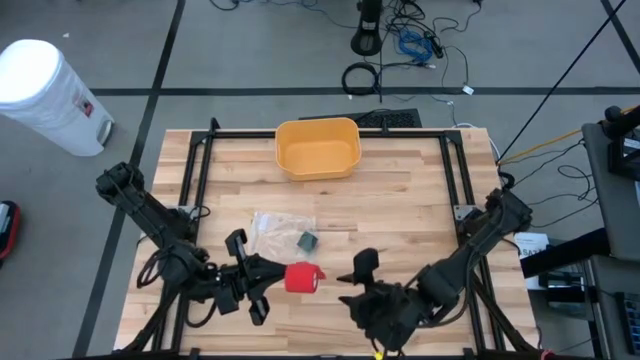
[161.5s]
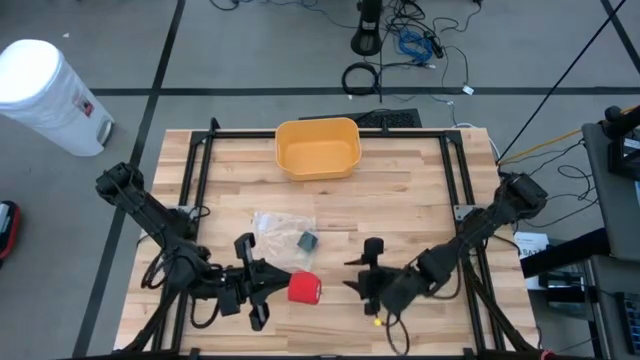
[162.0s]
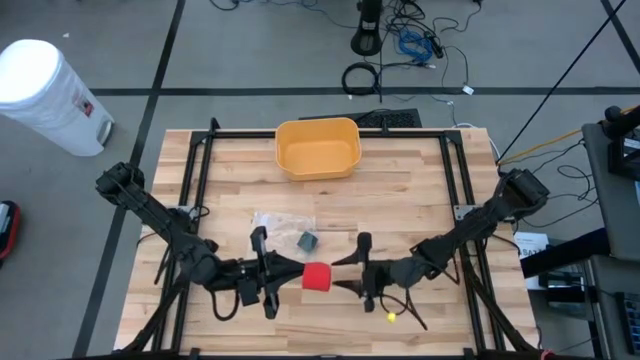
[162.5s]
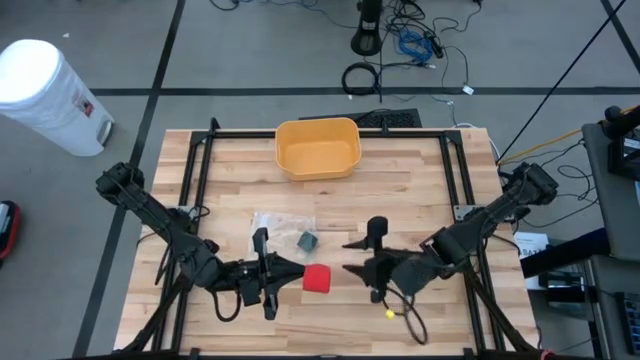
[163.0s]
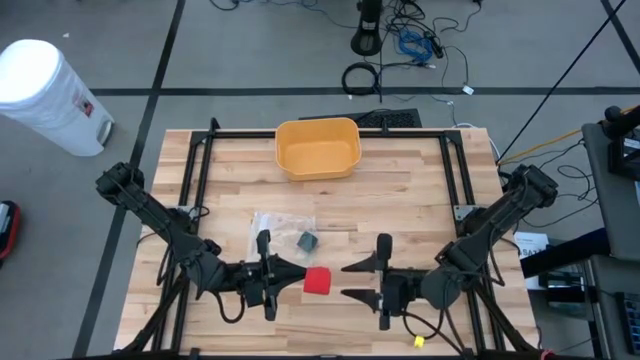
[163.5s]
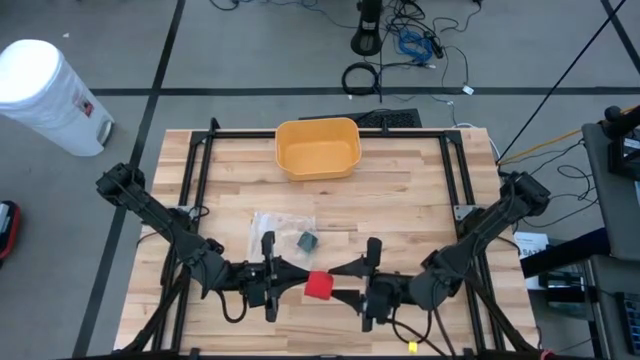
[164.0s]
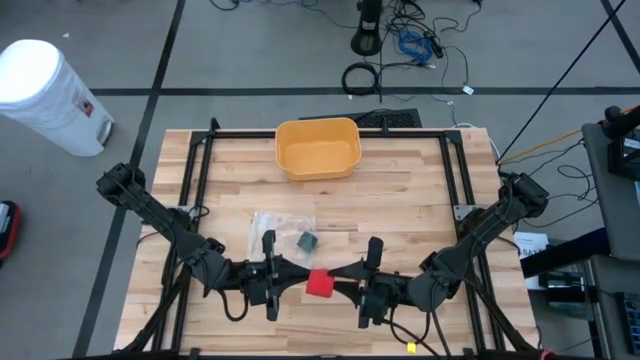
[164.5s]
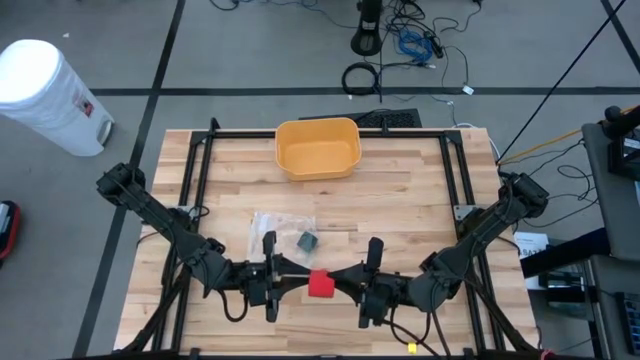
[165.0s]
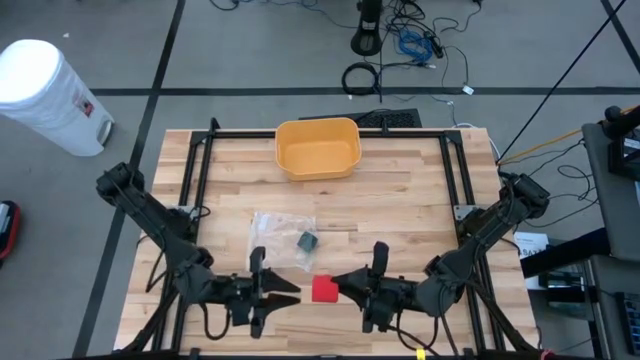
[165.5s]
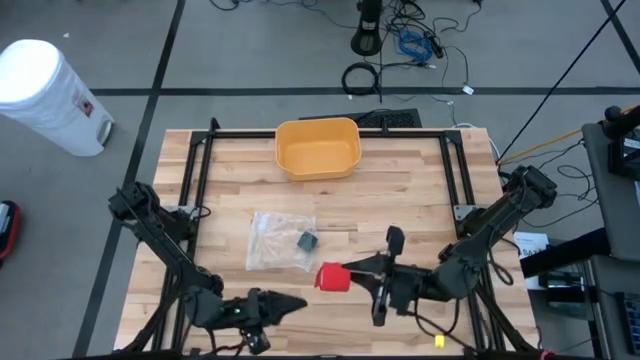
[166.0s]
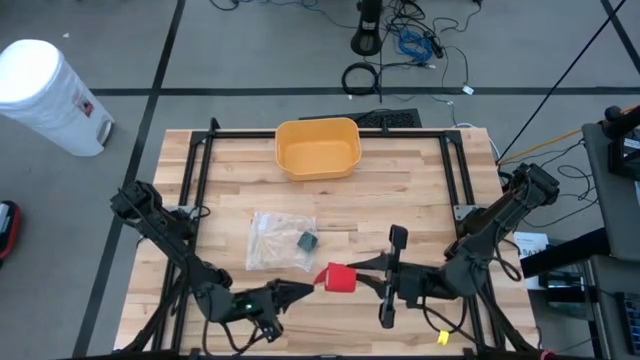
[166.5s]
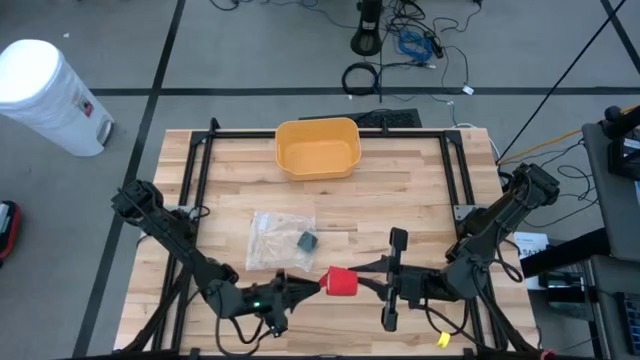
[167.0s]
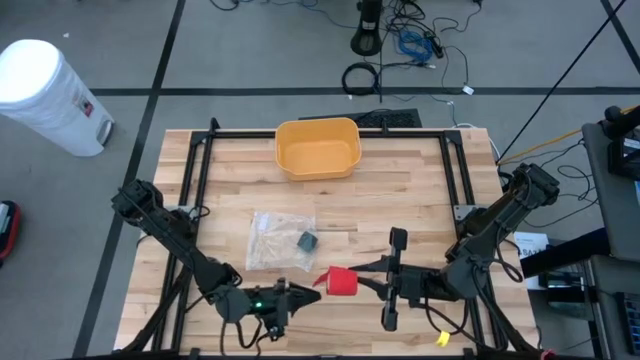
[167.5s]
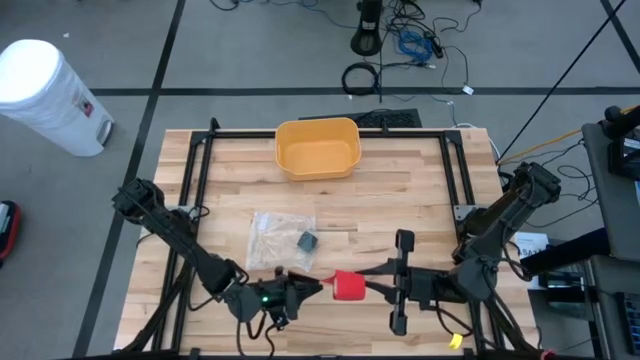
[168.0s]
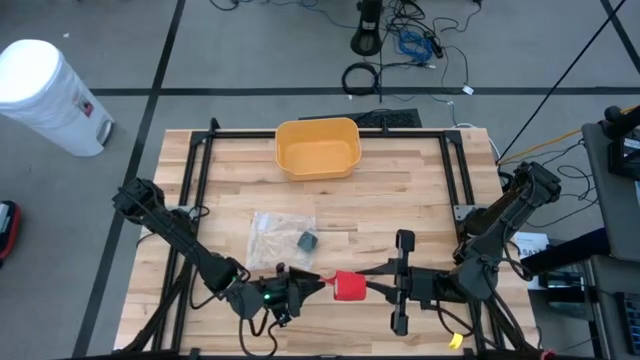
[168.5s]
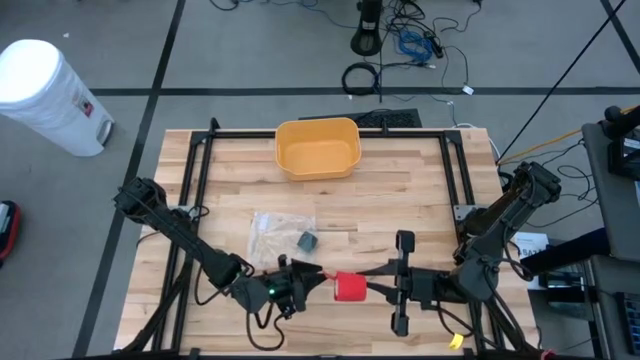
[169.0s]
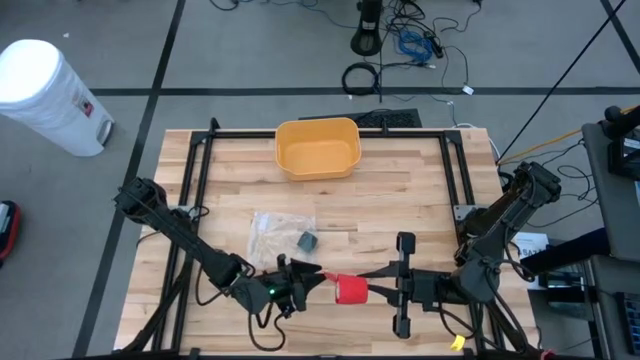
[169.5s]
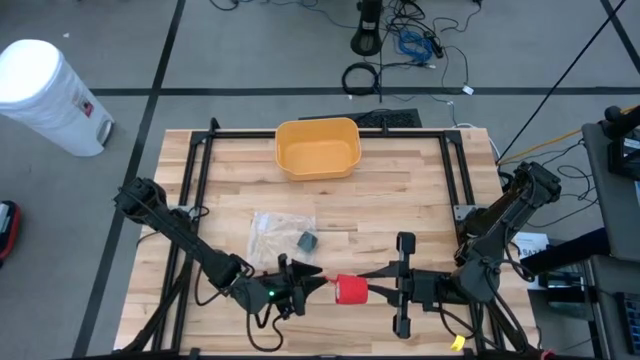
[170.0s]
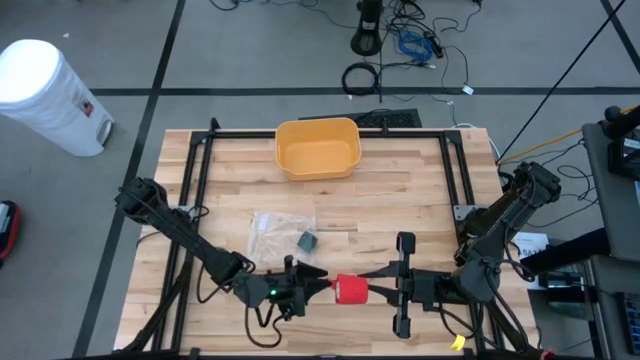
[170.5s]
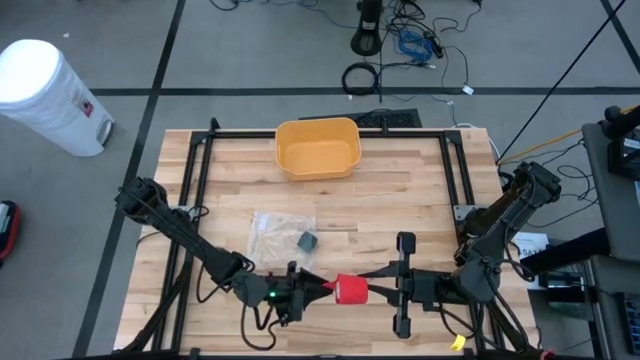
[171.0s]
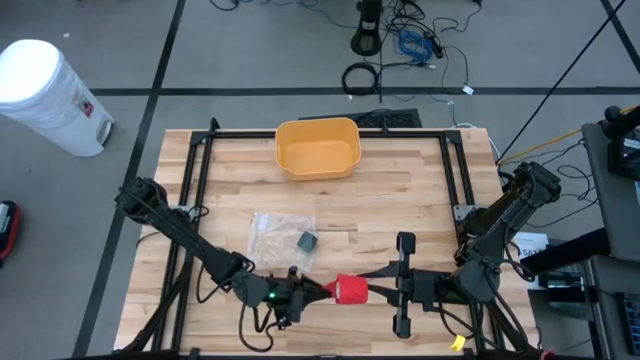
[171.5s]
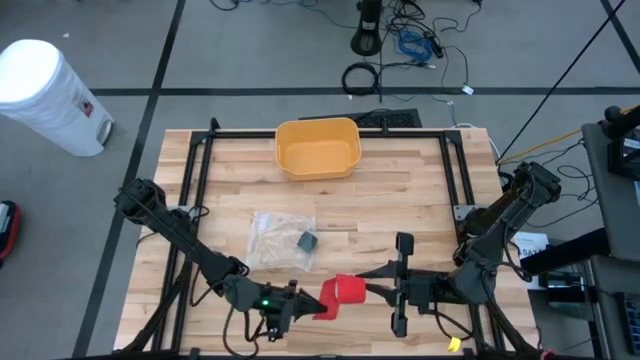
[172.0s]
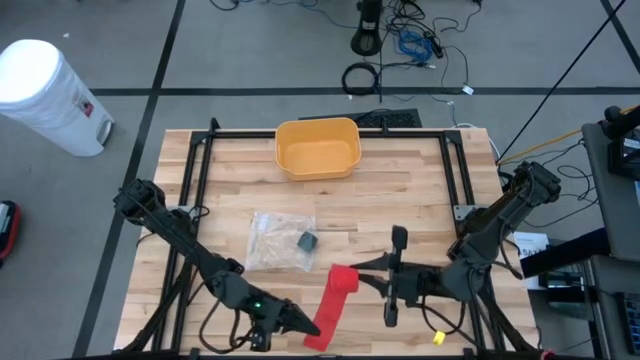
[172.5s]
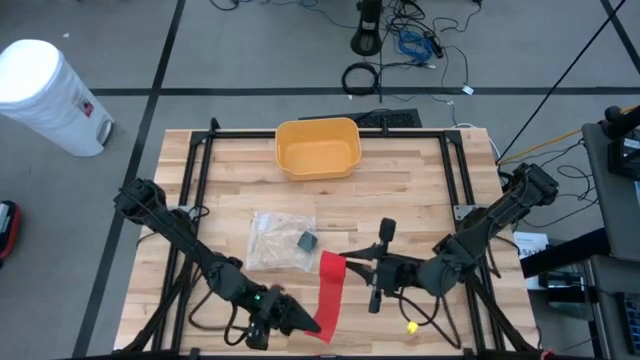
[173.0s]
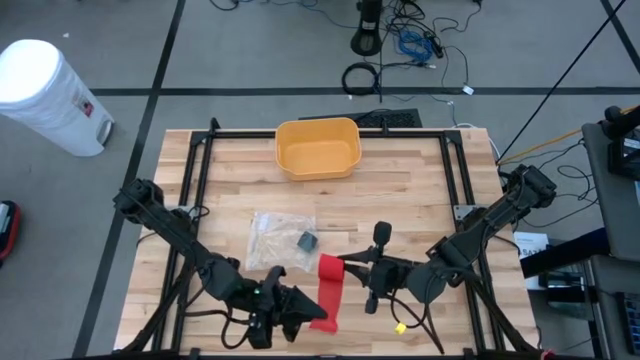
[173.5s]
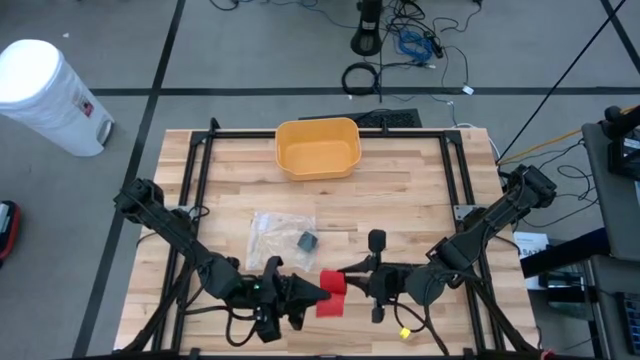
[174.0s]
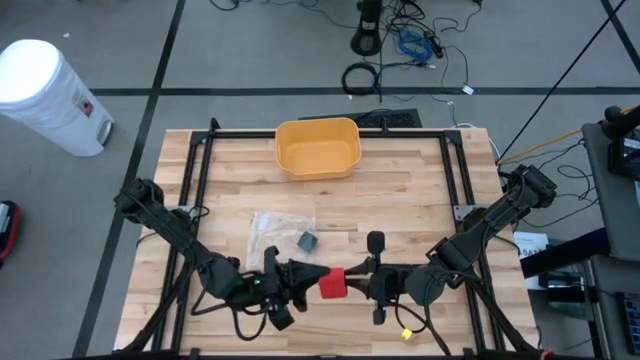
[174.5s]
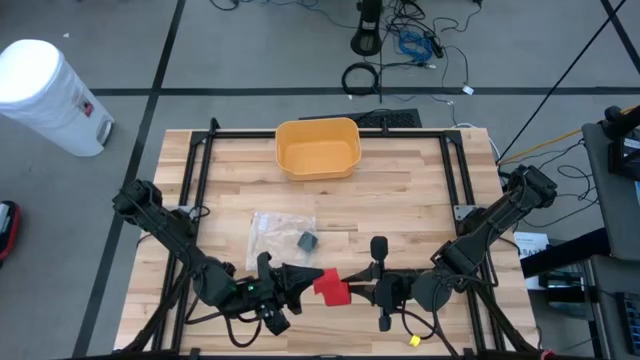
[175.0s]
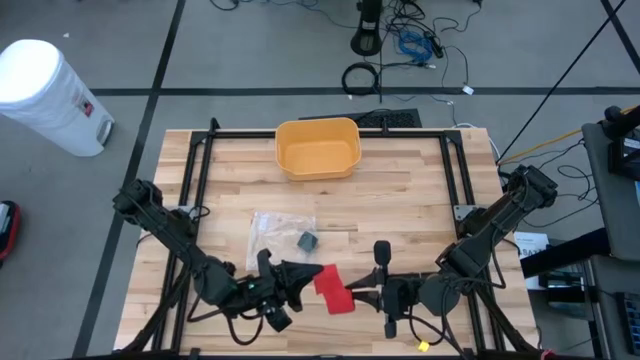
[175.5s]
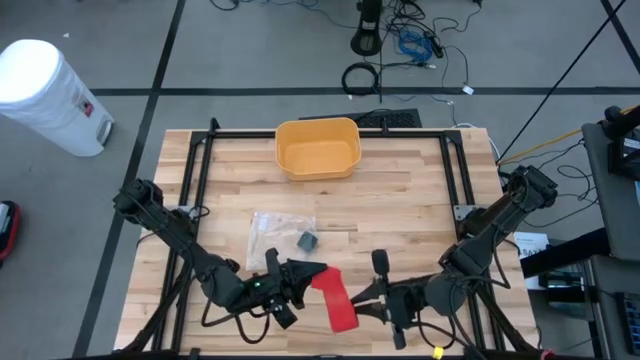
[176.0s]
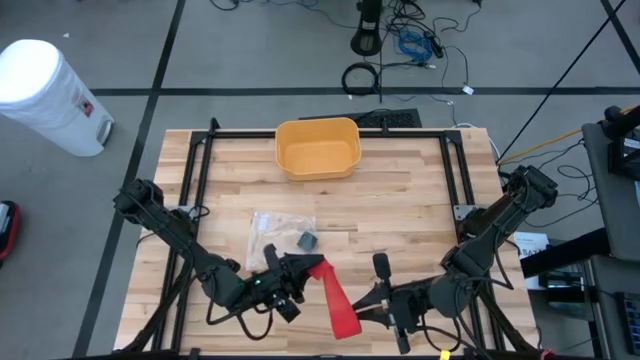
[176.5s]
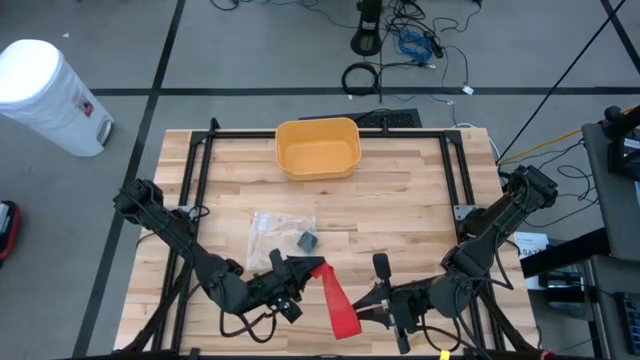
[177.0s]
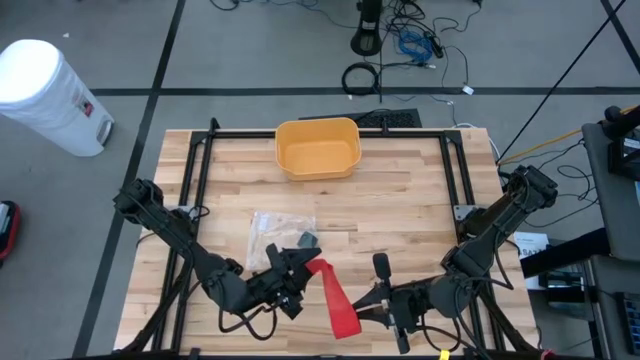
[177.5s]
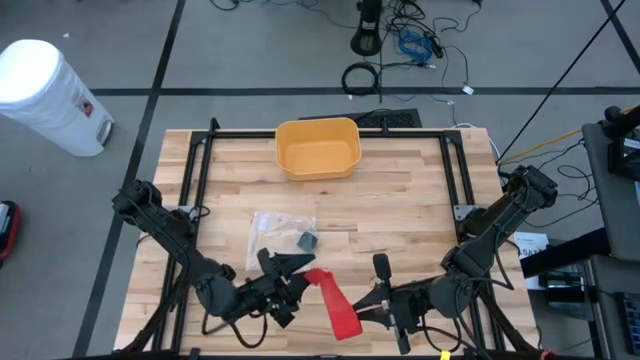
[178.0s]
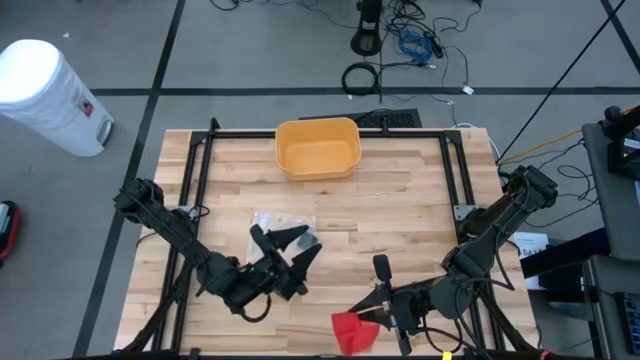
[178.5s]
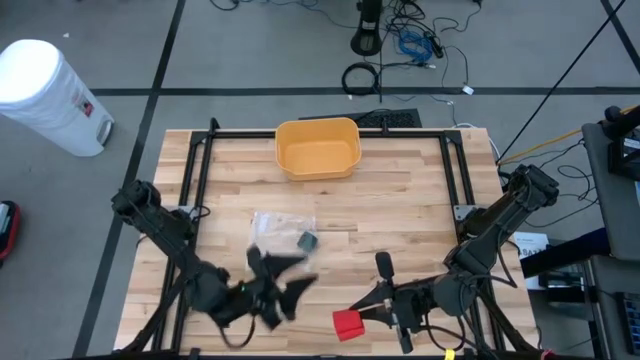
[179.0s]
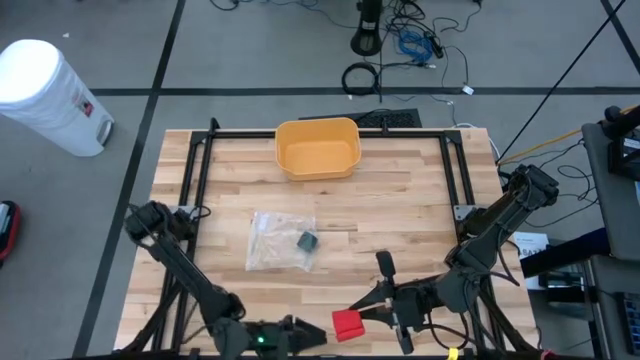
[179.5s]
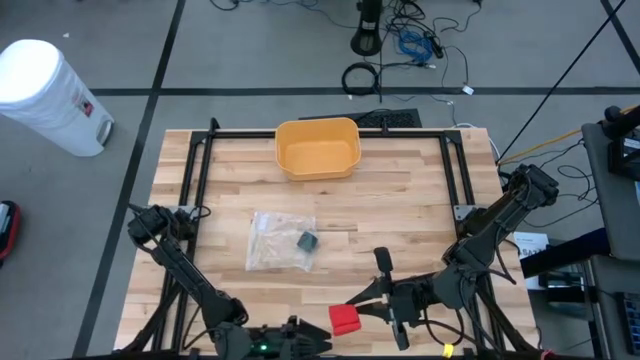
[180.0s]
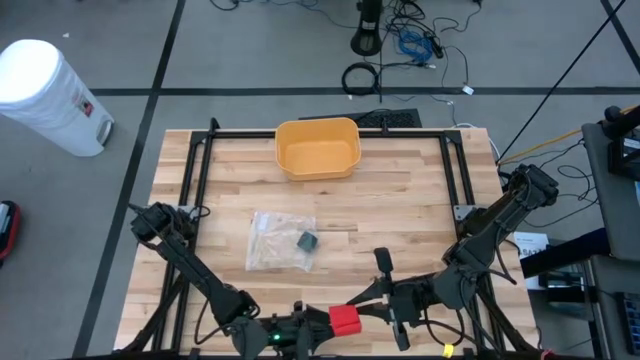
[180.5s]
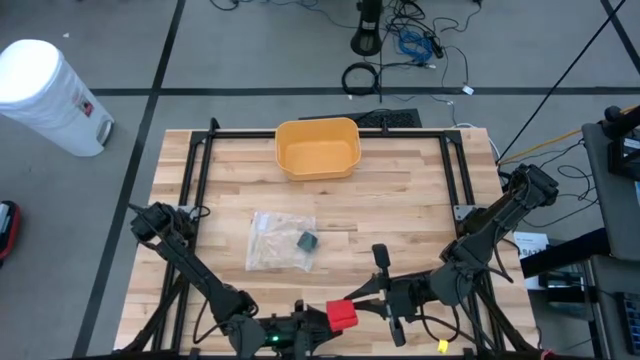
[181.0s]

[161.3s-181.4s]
Task: Roll bandage
Roll the red bandage
